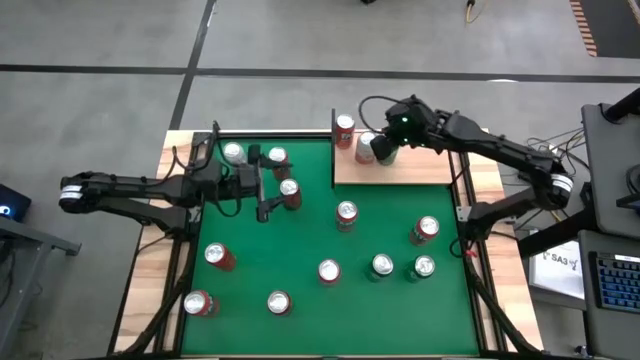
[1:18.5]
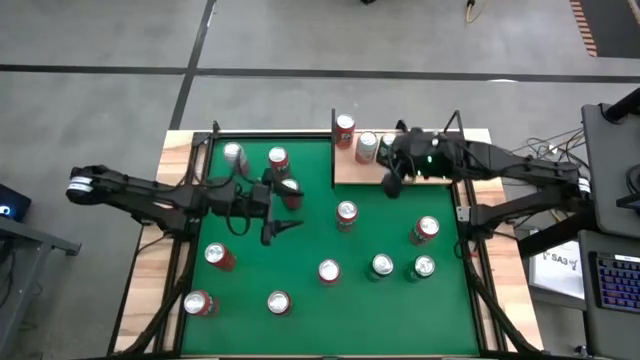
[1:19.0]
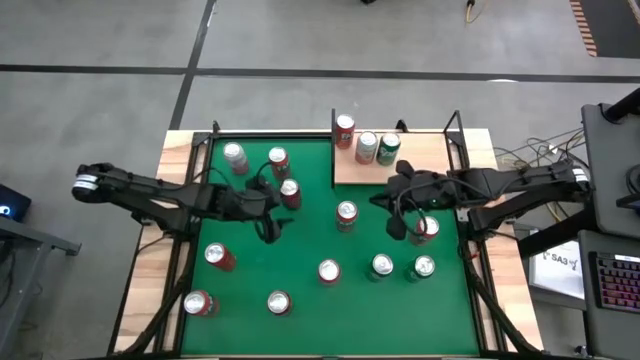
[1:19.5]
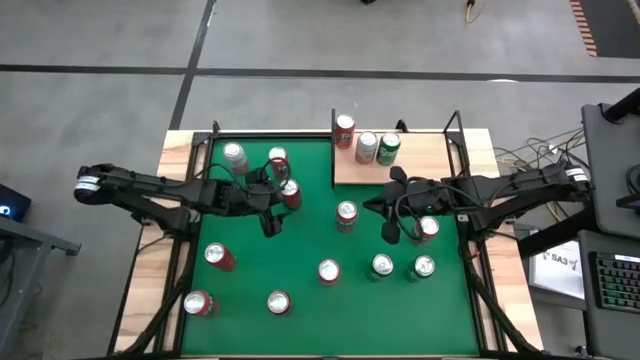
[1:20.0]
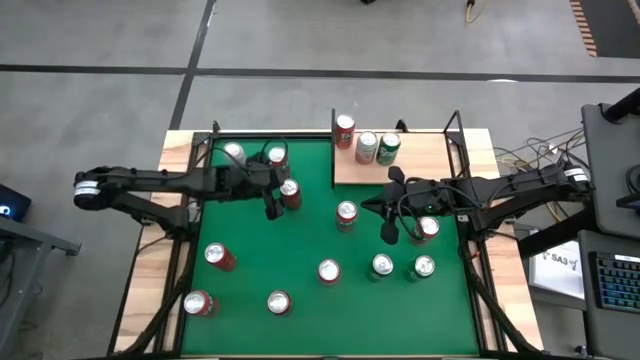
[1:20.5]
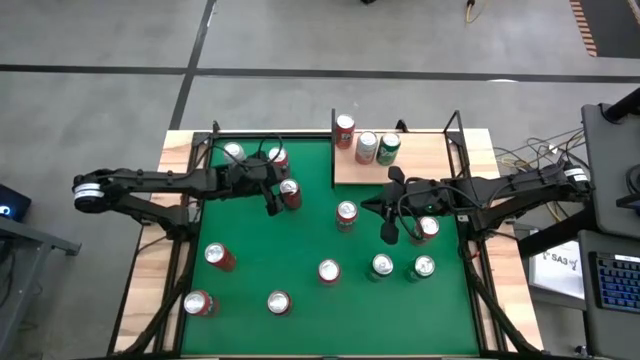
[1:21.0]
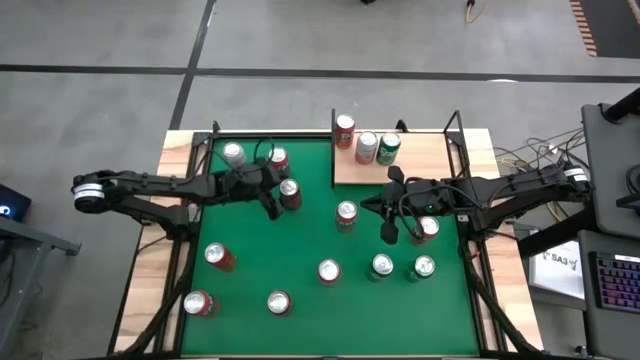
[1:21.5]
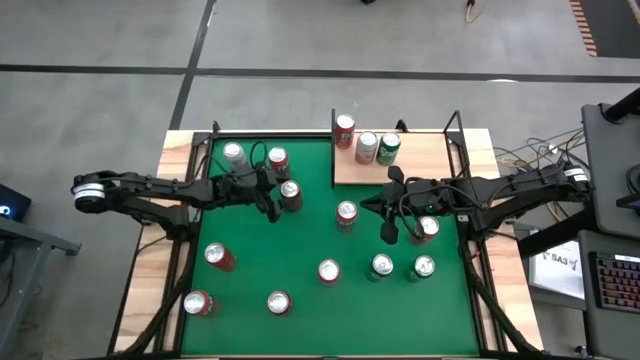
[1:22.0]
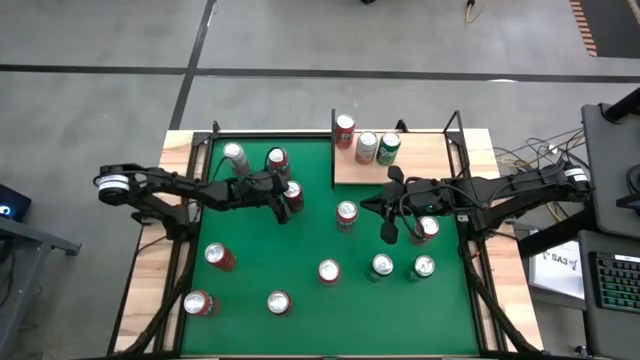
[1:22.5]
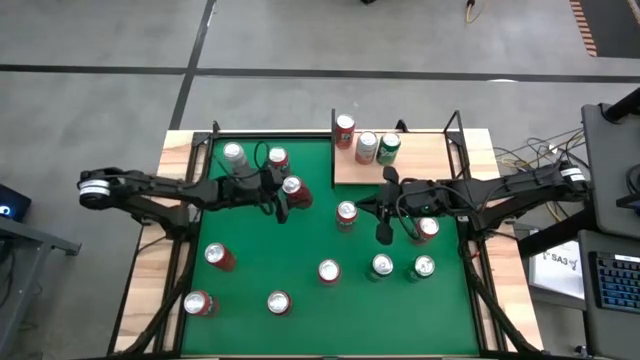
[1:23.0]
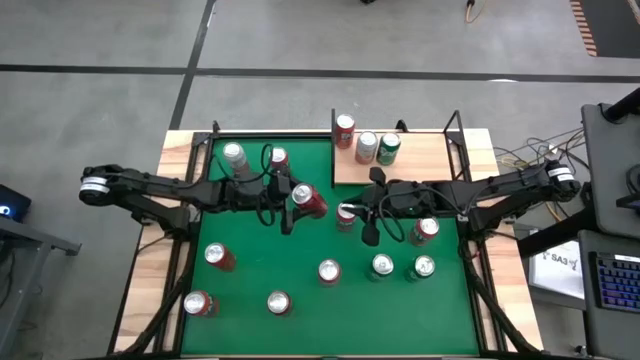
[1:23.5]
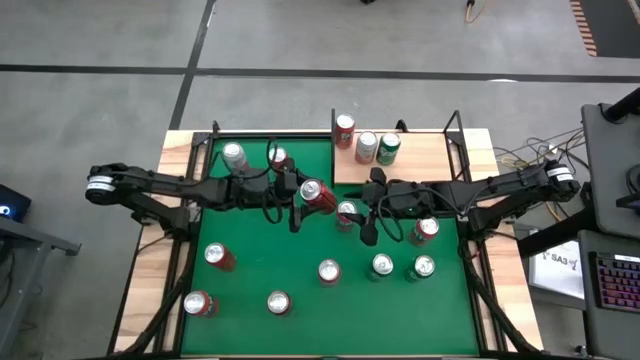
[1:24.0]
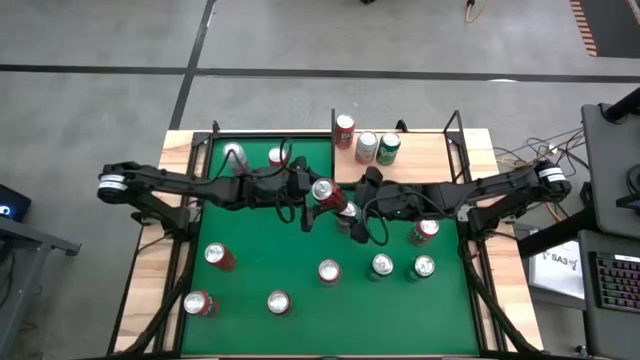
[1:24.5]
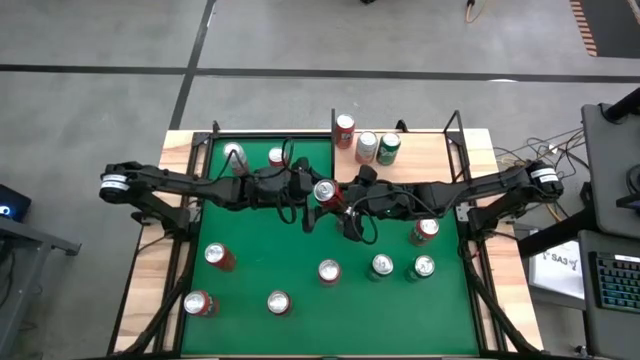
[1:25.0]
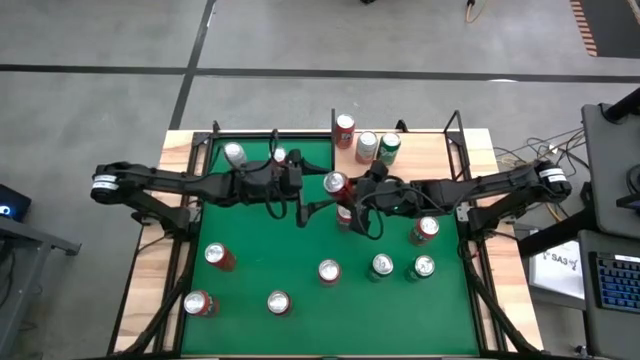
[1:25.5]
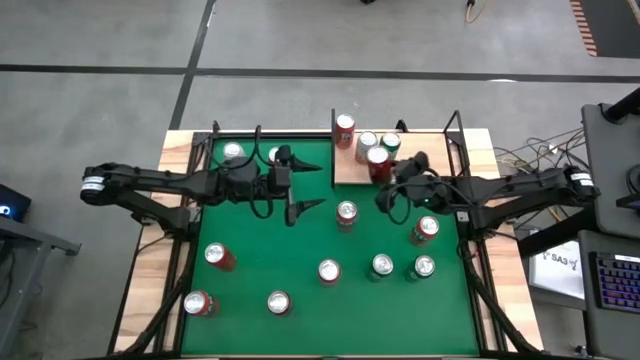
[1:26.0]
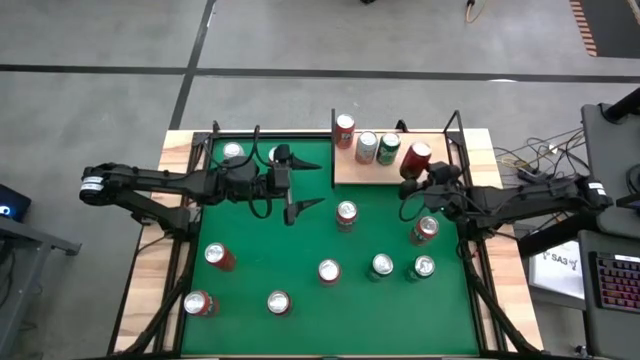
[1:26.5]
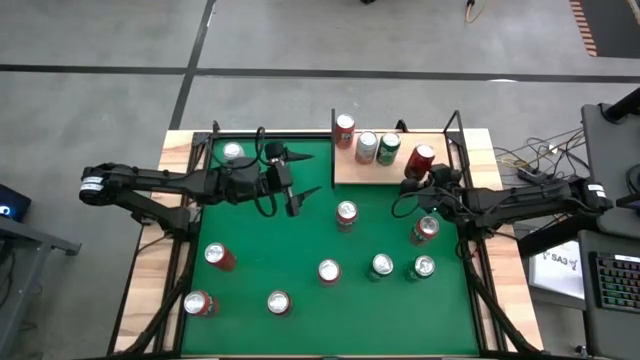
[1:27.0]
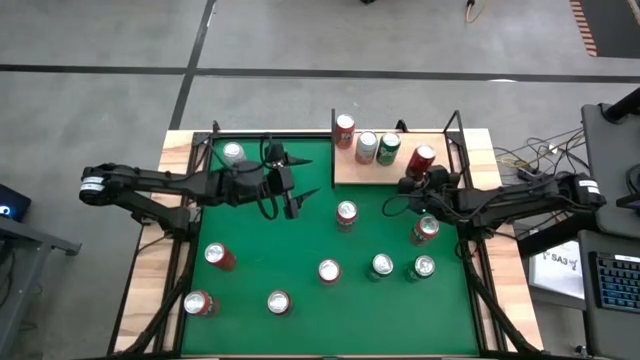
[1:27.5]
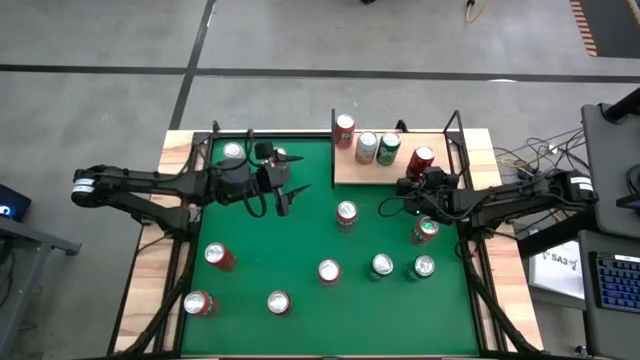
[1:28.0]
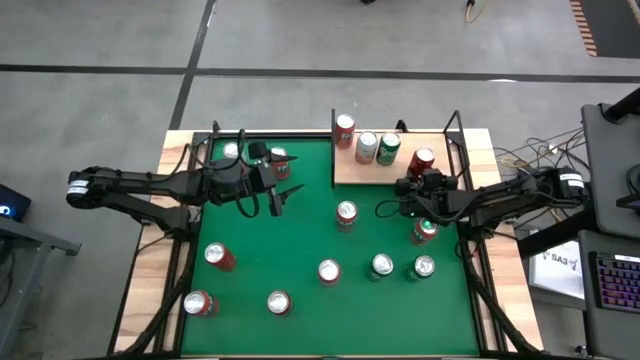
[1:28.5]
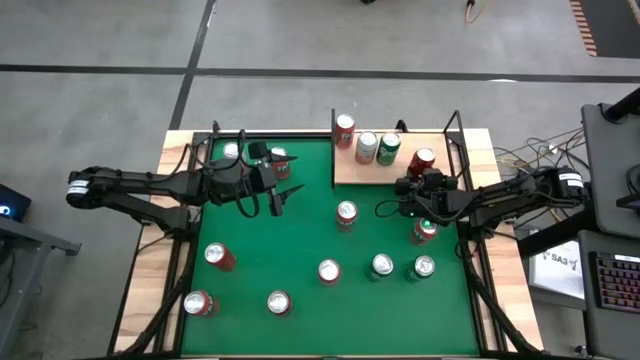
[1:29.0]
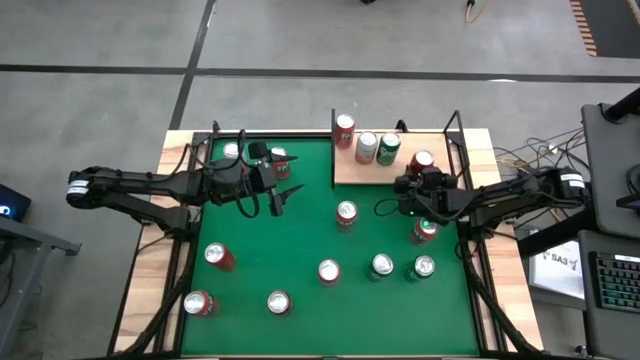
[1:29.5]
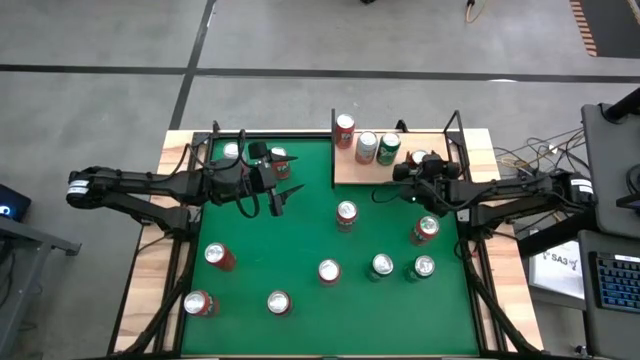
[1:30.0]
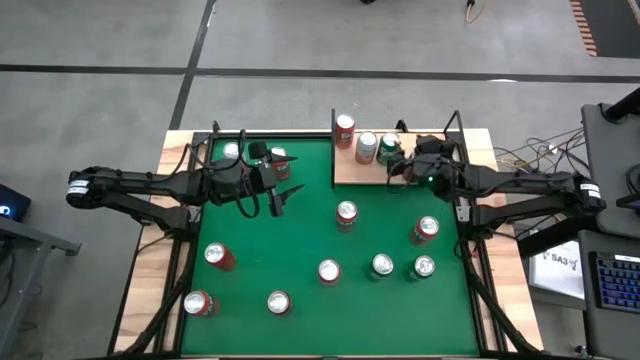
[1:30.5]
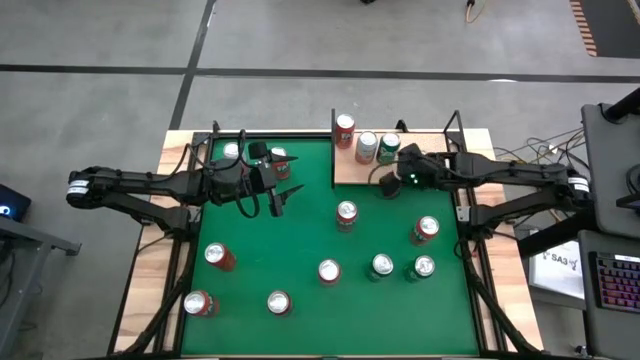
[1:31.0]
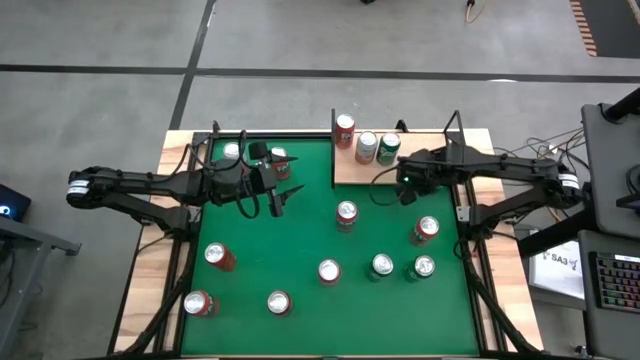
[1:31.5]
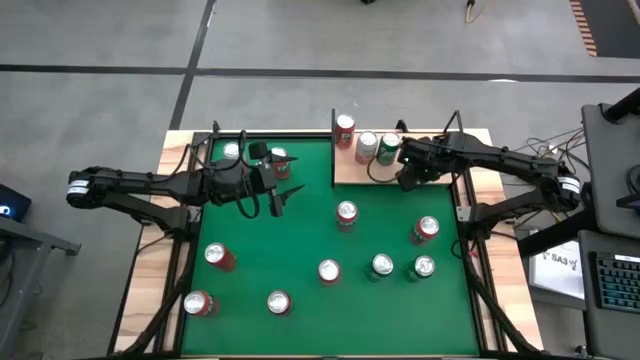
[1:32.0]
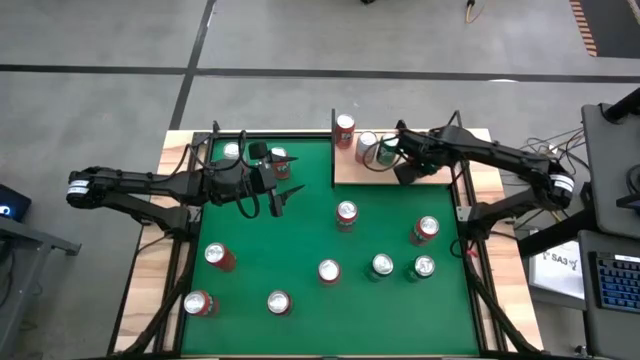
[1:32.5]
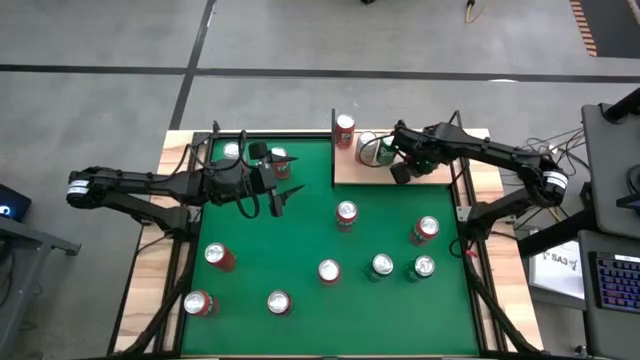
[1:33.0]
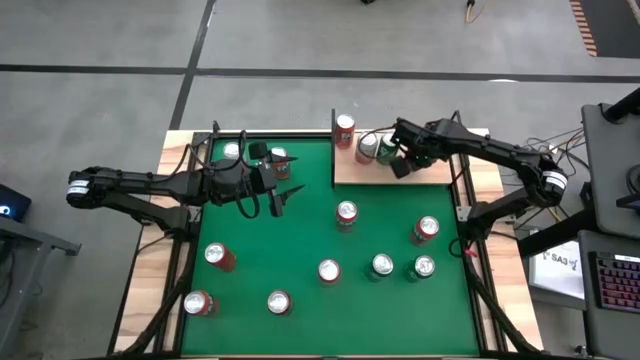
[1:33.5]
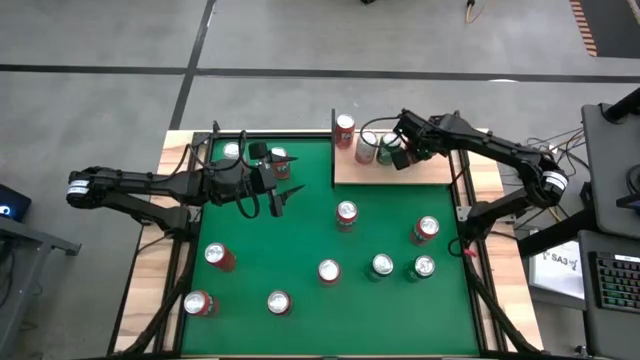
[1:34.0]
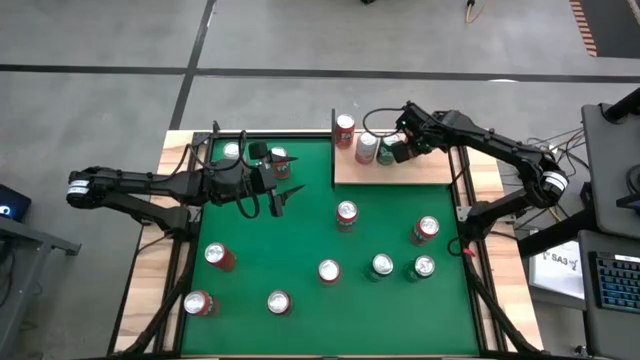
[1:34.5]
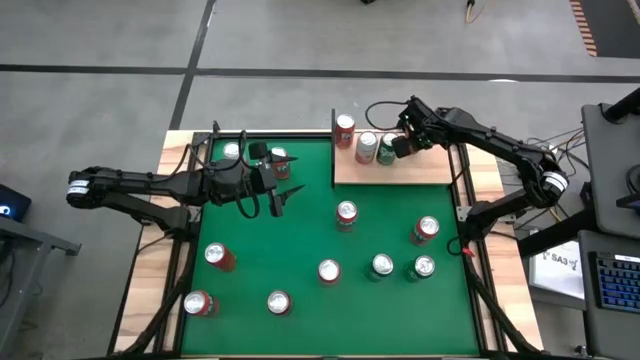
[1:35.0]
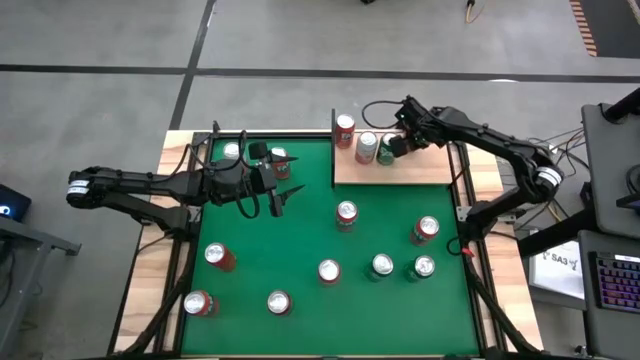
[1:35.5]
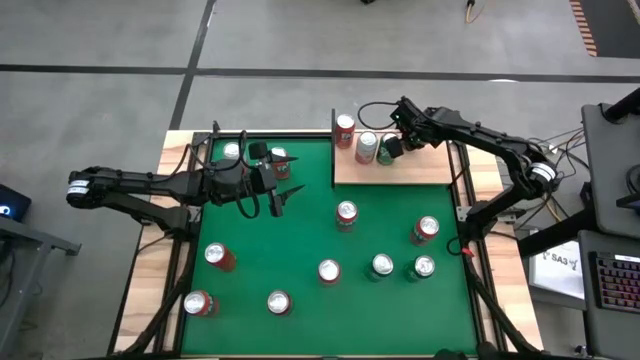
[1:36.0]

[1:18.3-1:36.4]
Task: Place canned beverage on shelf
Put the top red/black soda can on the shelf
